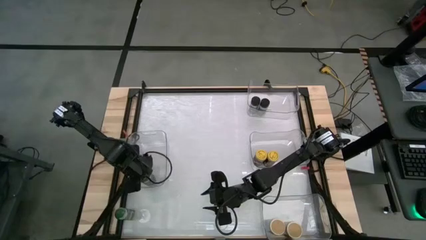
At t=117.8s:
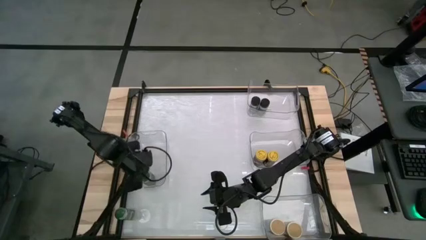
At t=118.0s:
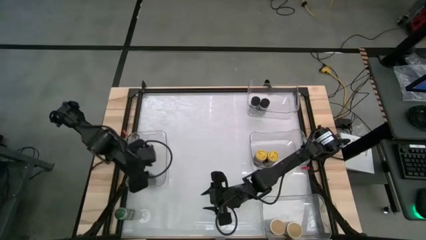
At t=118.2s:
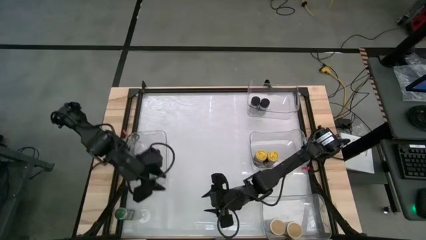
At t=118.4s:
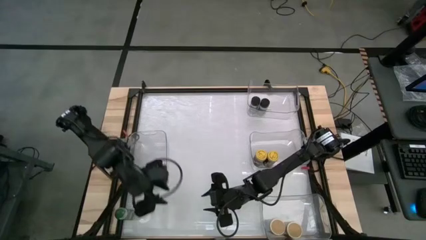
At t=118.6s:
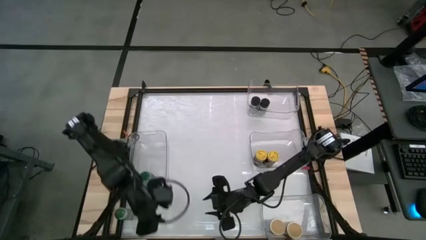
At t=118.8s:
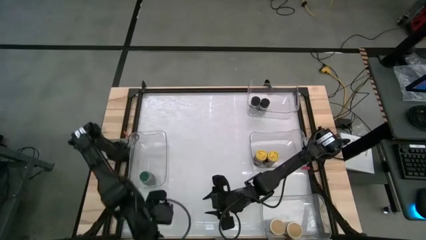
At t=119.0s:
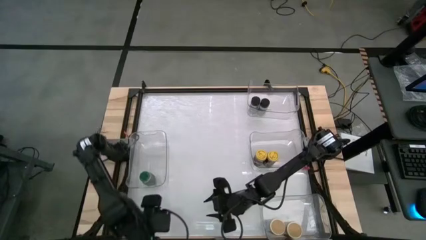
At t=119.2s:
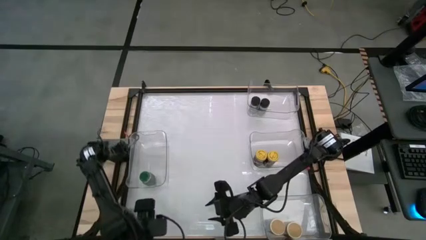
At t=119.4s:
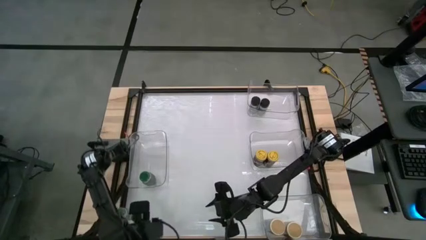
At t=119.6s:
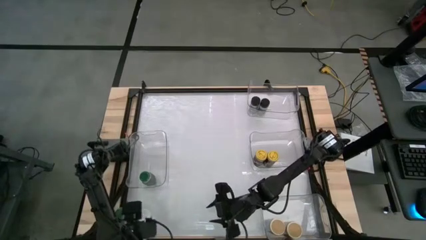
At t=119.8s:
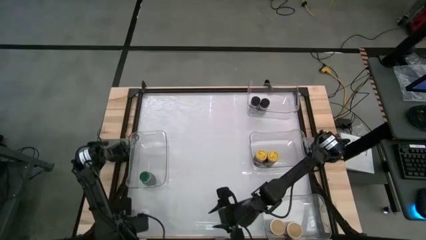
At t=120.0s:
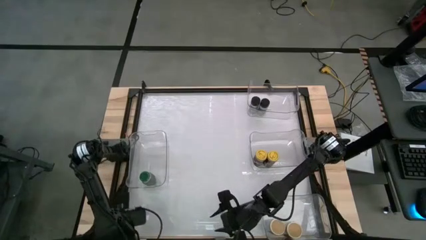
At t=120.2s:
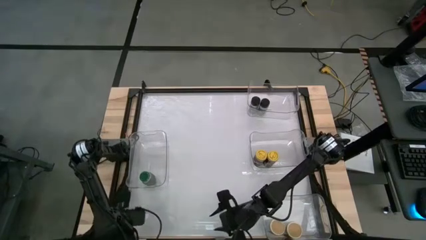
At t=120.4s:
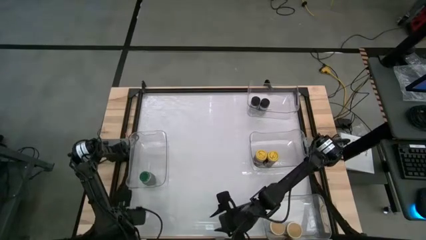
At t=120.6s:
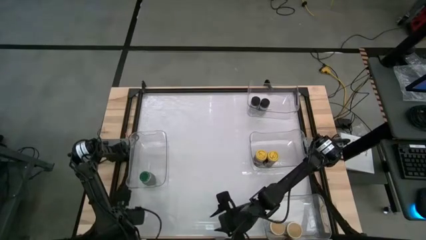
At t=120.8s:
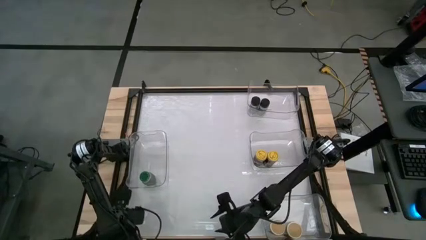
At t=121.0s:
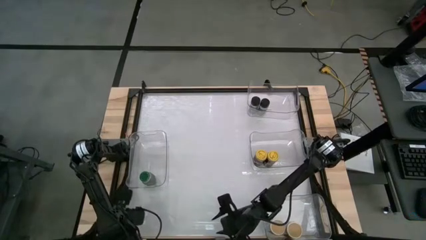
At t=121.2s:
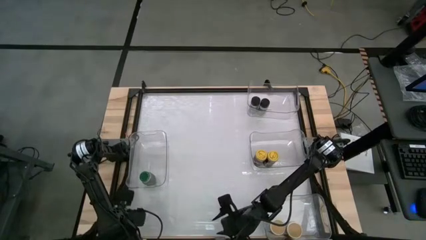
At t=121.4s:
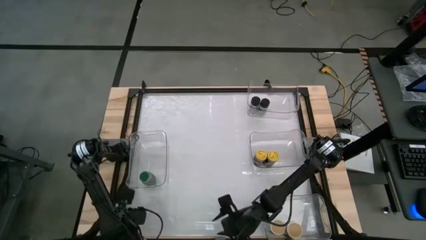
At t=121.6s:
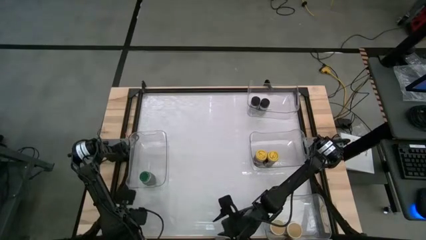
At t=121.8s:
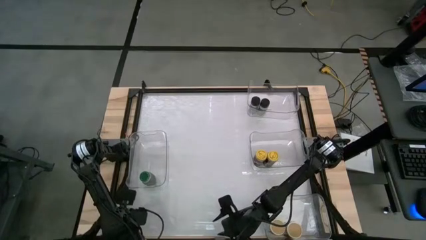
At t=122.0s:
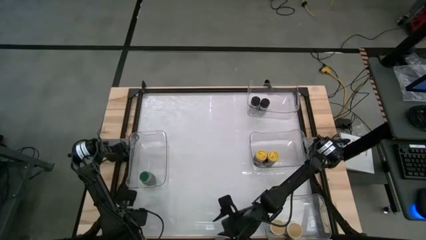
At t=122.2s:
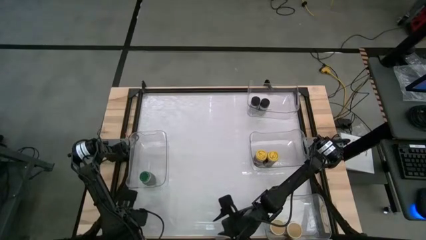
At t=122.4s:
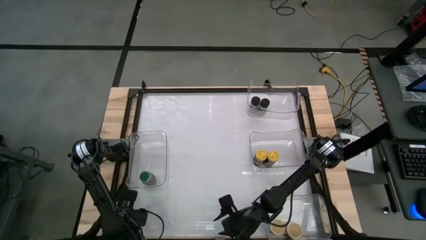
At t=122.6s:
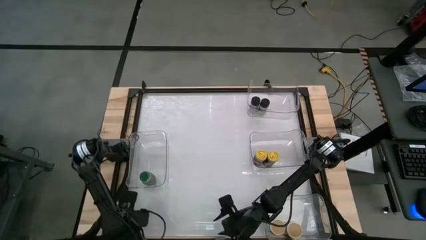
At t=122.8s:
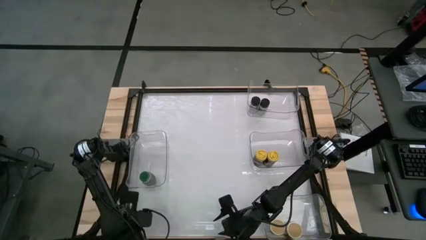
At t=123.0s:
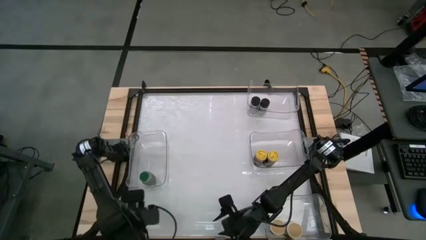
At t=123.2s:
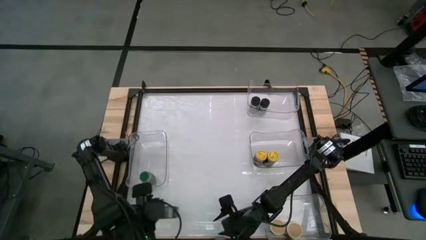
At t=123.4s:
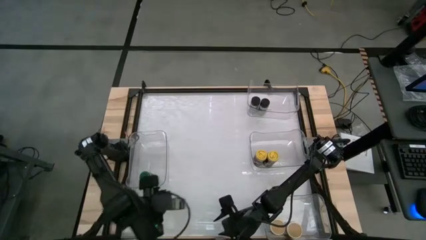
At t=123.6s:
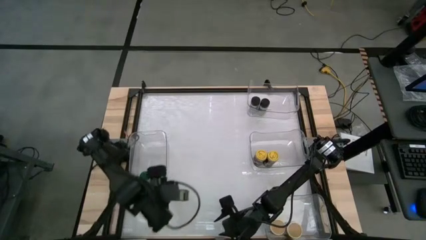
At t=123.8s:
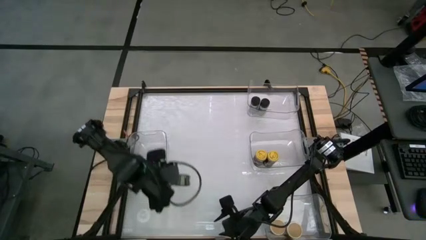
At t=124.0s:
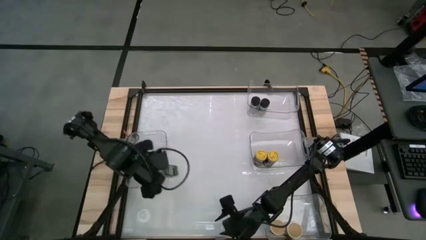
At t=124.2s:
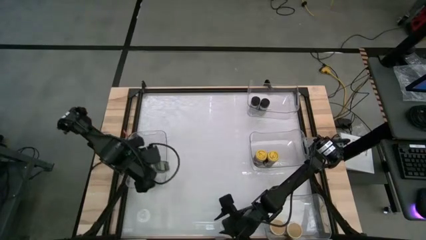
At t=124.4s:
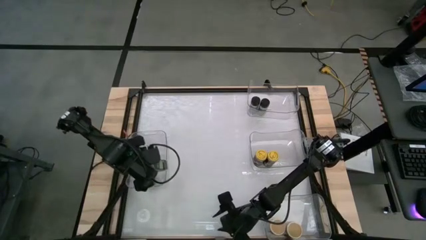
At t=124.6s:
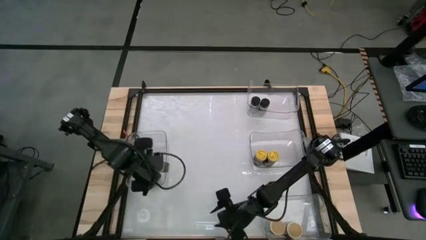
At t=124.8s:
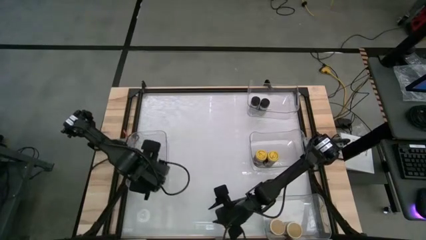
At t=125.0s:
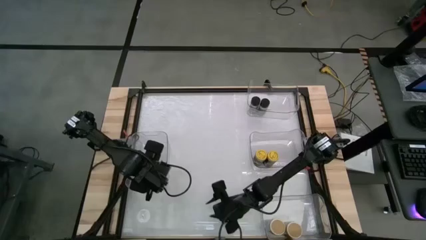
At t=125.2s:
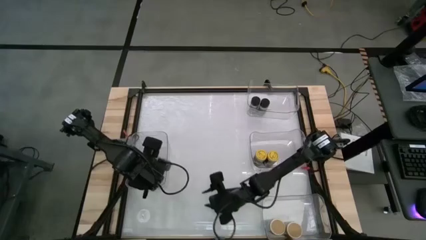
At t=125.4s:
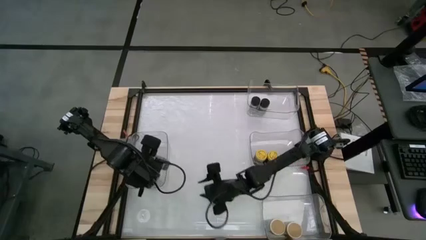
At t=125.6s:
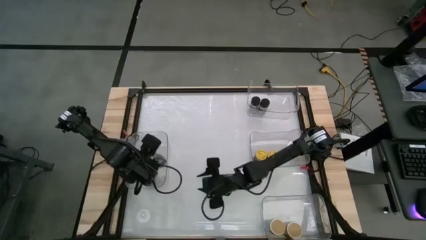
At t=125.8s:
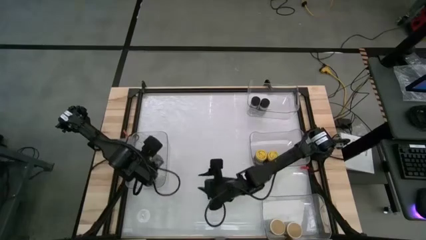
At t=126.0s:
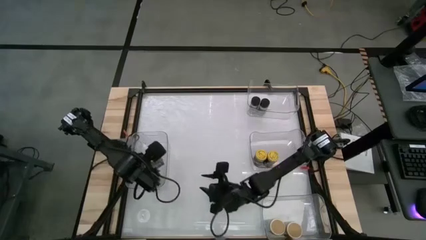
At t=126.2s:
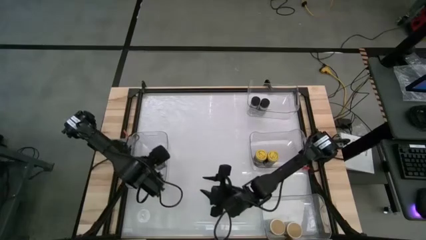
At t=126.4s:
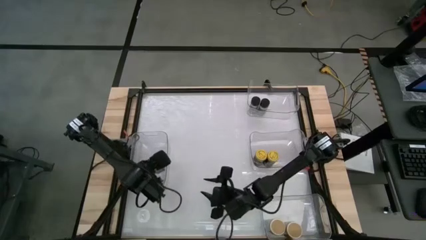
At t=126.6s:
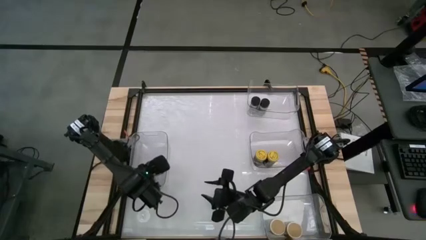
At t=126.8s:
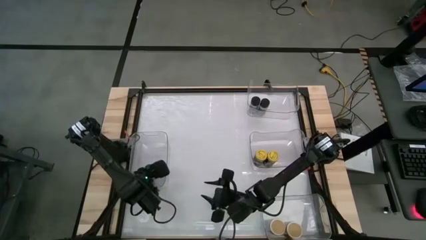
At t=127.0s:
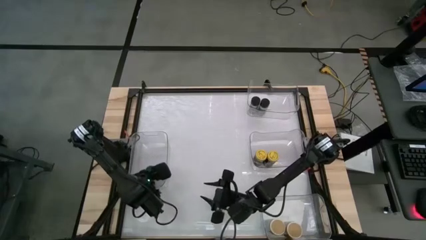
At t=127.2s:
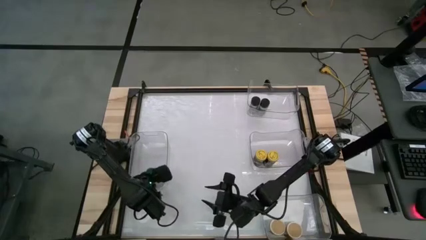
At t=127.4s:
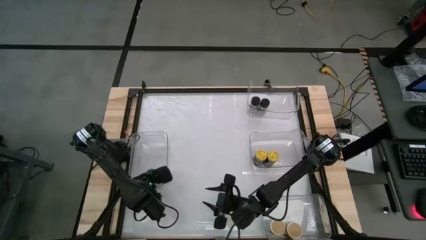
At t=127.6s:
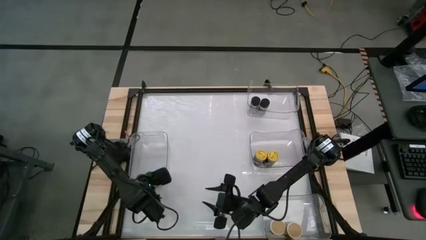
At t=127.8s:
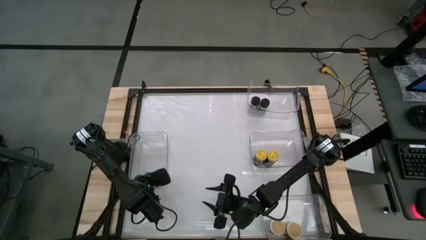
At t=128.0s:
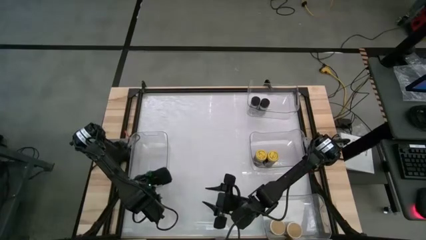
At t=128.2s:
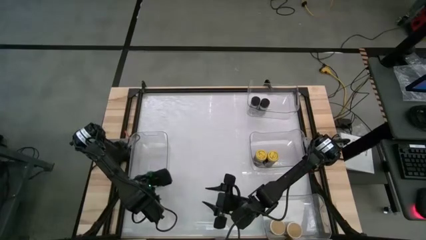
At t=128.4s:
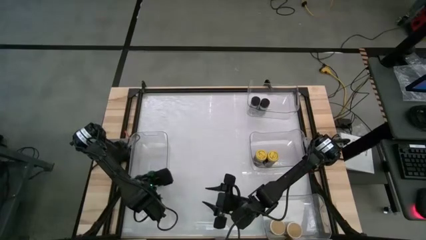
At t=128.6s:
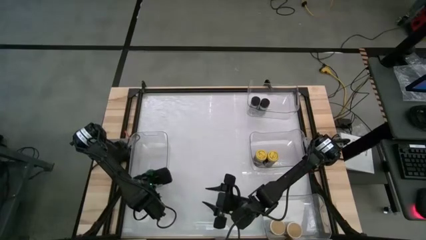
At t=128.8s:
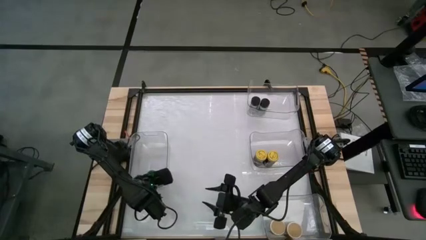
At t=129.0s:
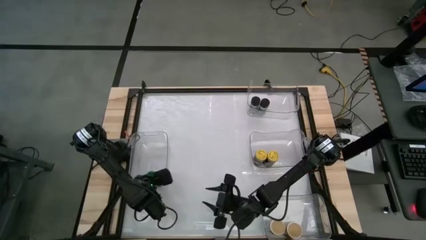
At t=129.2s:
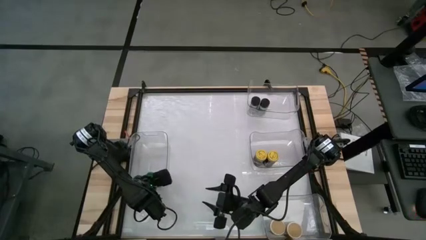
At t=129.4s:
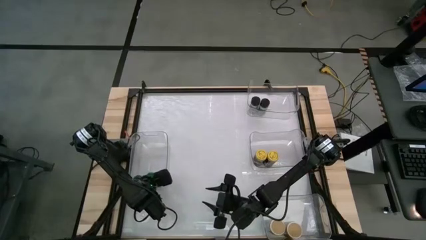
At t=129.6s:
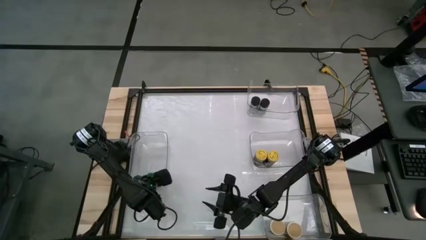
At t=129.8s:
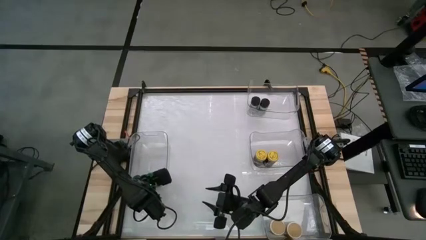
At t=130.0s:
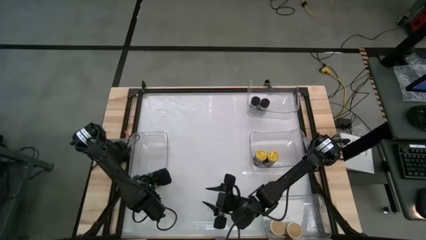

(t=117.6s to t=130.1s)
Task: Sort spices by type
Put the green seasoning bottle into the middle left transparent bin
